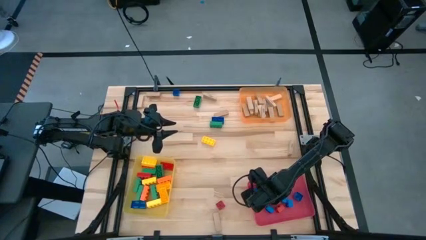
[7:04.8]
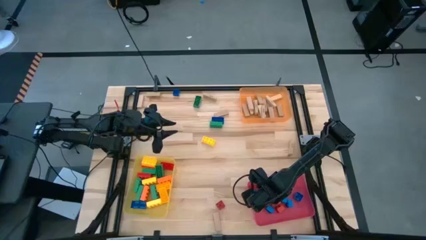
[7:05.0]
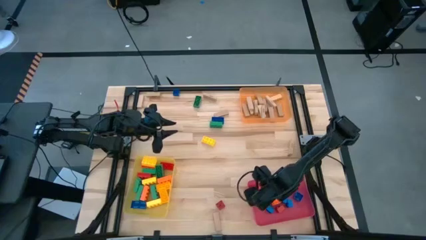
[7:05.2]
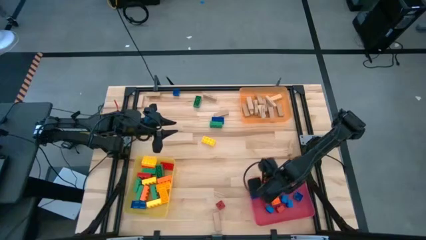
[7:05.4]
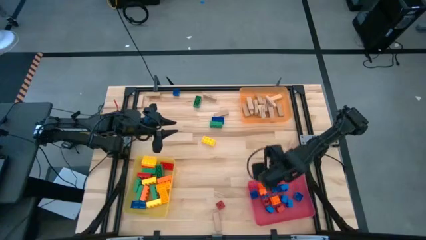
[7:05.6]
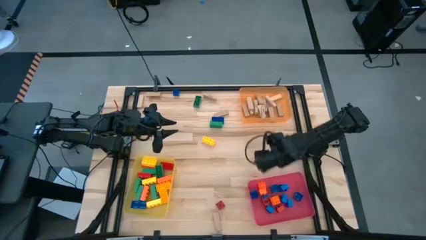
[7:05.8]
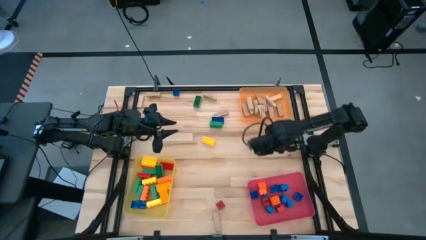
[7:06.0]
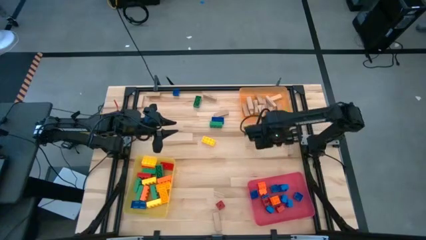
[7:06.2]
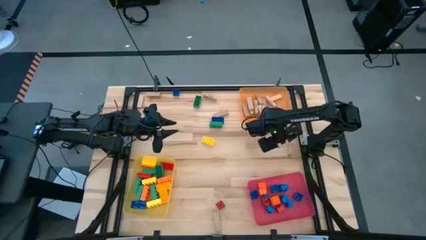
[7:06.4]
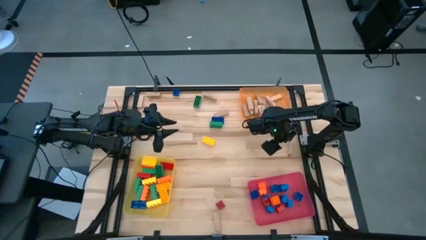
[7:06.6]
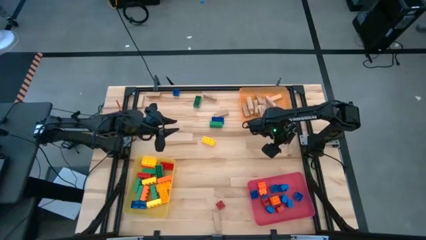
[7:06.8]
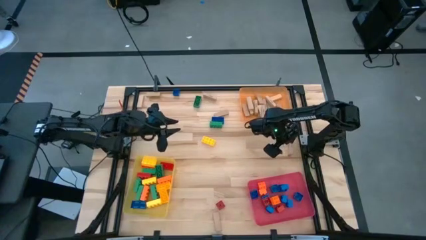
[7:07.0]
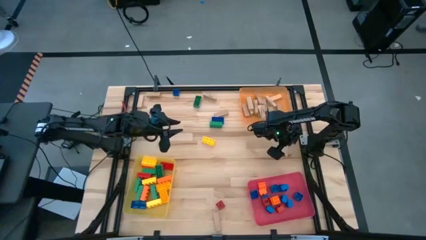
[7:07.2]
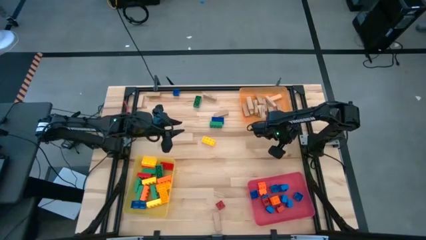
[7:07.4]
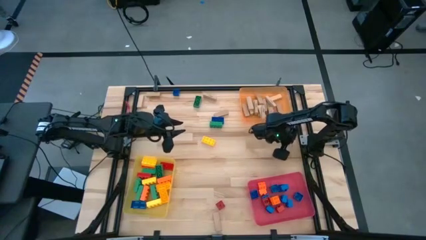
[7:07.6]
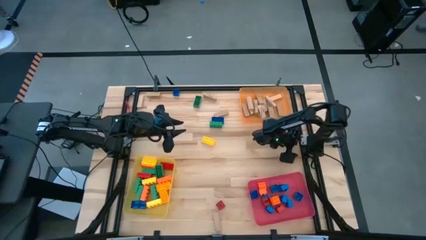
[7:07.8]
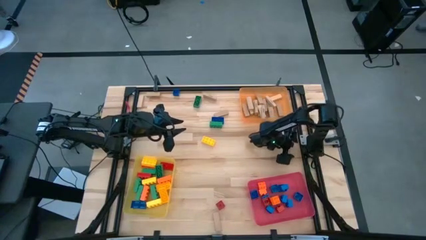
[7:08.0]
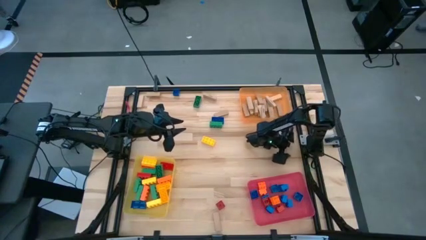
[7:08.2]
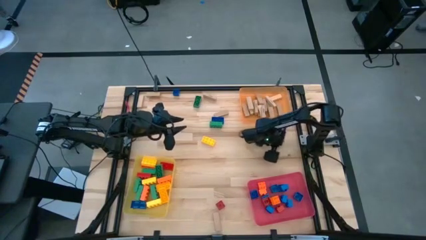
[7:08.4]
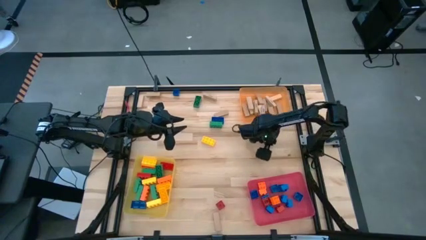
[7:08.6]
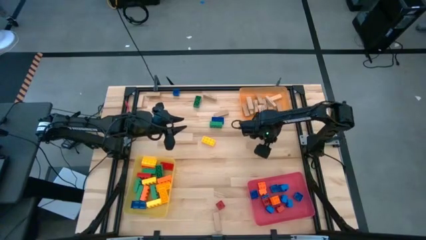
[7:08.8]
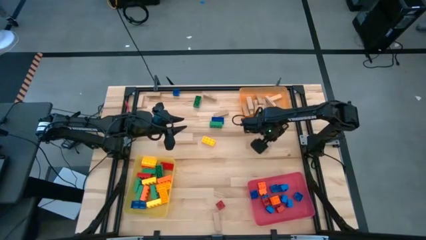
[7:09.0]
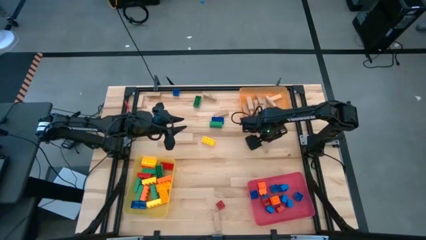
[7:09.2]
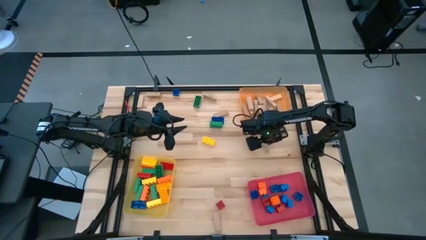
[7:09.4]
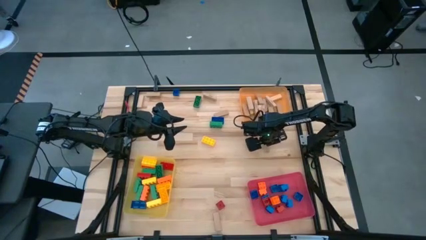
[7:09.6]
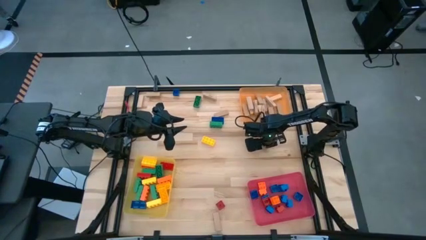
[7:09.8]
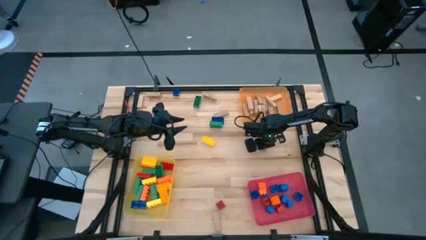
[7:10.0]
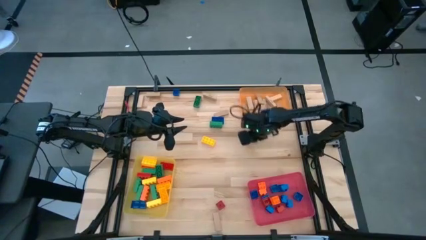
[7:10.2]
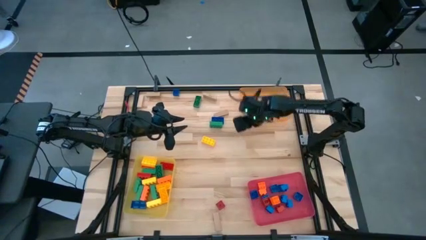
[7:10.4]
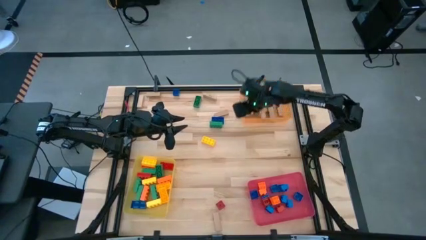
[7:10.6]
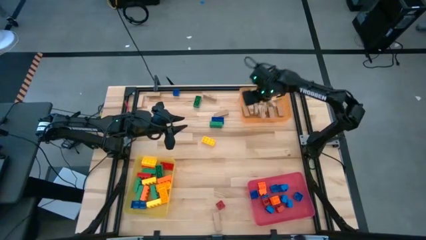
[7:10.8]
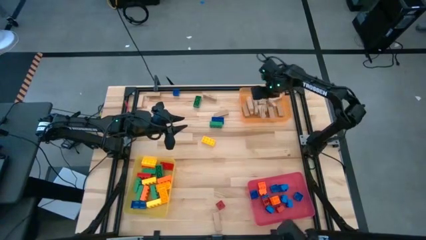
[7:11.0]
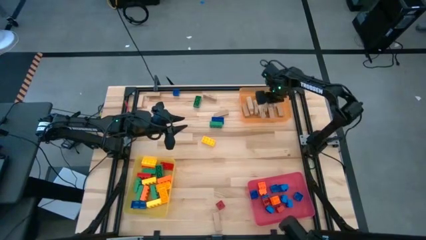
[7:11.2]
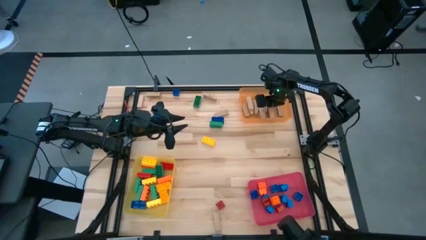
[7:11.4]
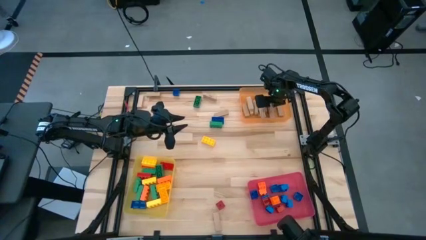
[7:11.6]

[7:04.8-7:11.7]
Task: Sort blocks by size
Put the brown block into the orange bin

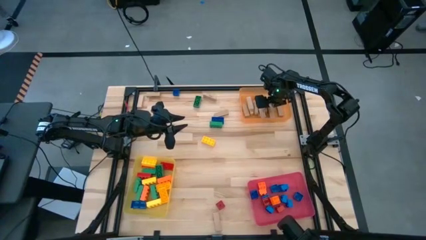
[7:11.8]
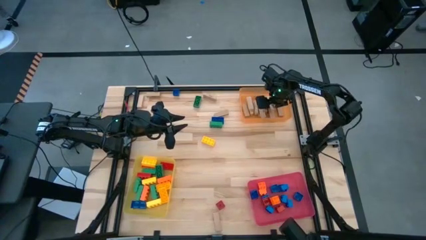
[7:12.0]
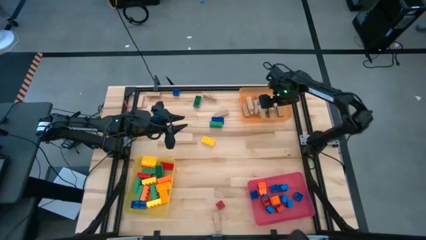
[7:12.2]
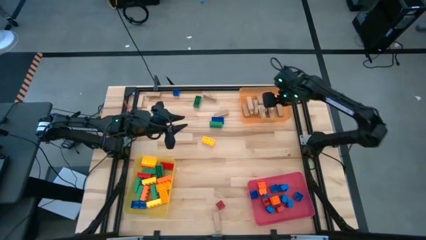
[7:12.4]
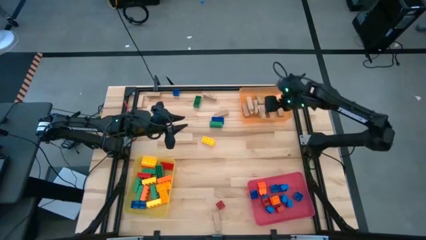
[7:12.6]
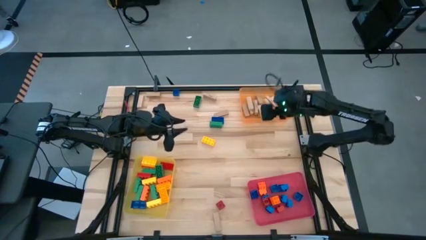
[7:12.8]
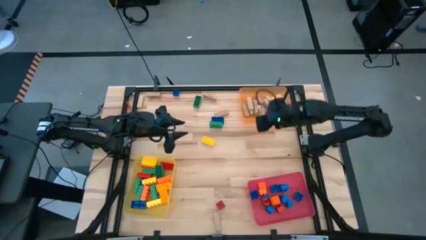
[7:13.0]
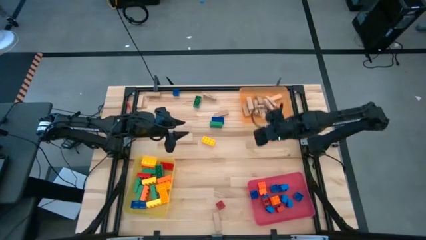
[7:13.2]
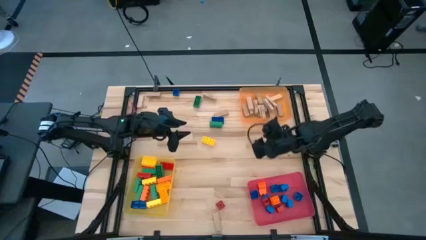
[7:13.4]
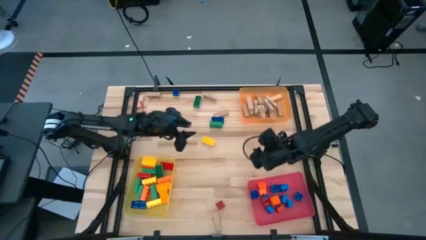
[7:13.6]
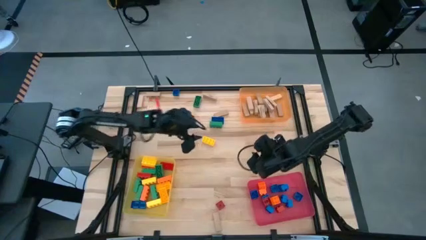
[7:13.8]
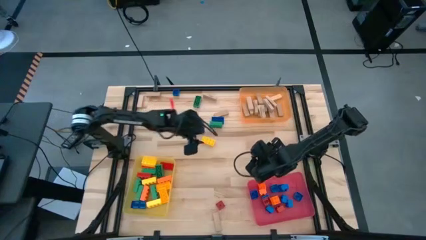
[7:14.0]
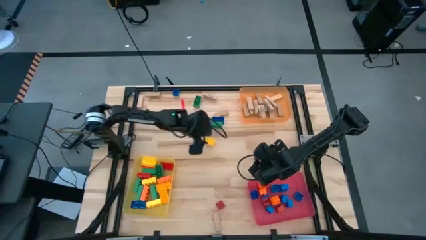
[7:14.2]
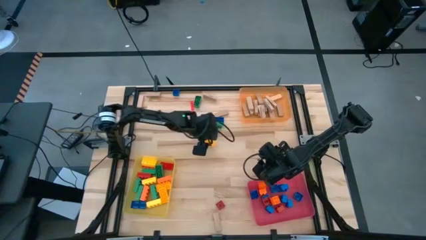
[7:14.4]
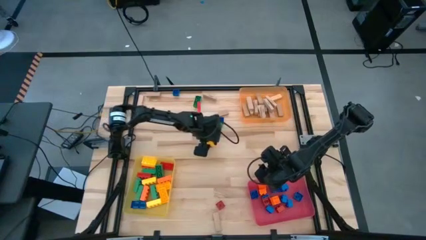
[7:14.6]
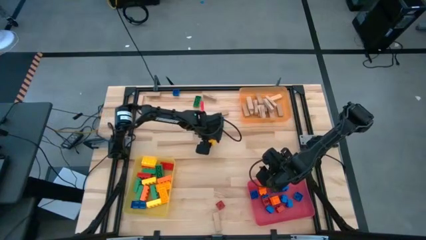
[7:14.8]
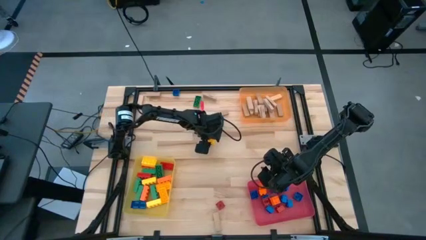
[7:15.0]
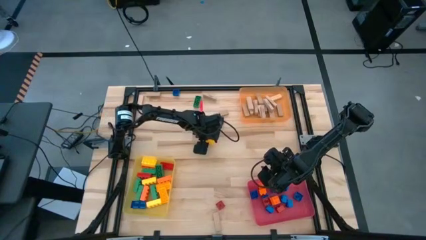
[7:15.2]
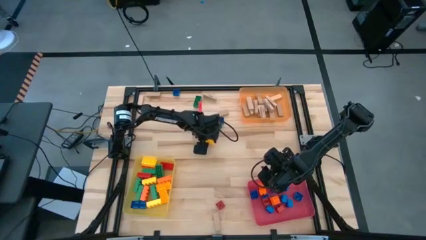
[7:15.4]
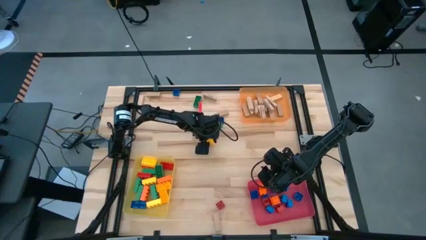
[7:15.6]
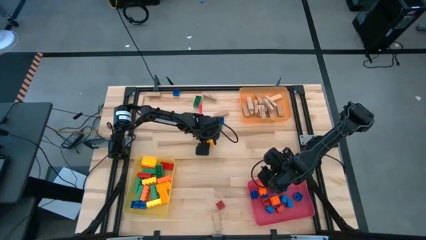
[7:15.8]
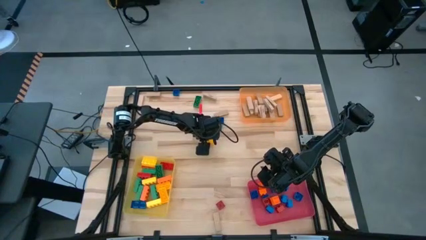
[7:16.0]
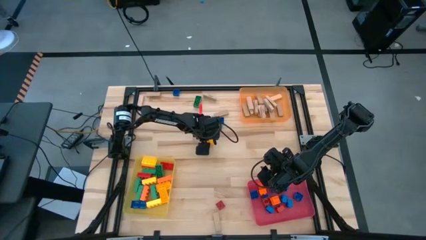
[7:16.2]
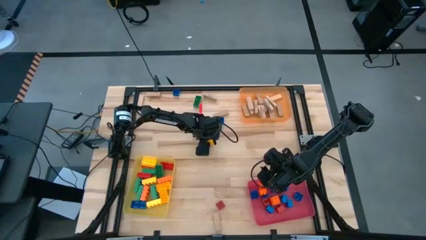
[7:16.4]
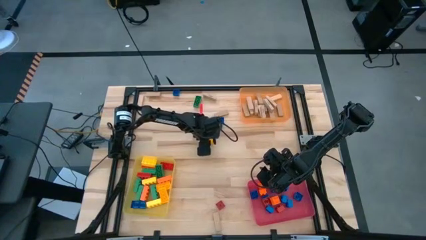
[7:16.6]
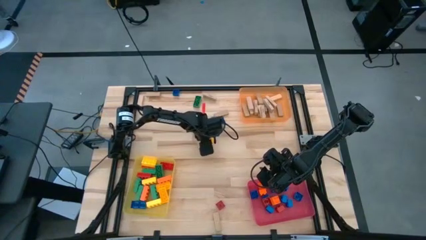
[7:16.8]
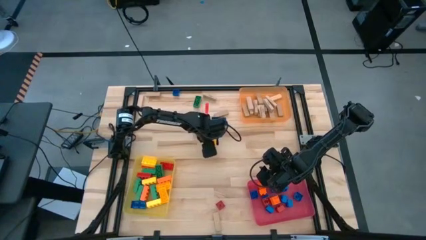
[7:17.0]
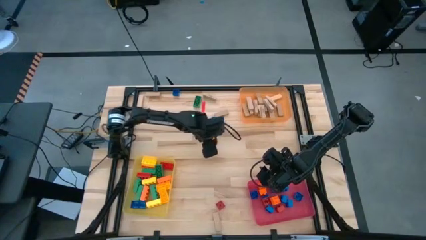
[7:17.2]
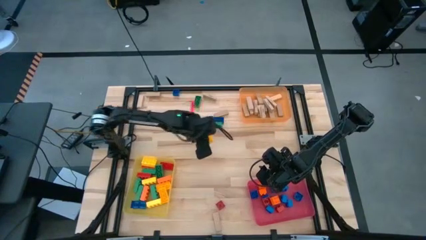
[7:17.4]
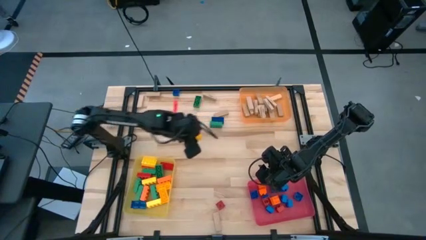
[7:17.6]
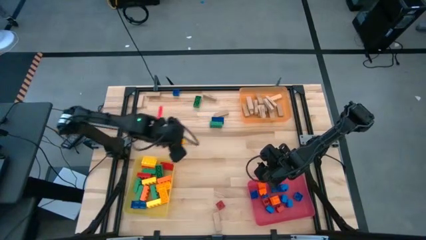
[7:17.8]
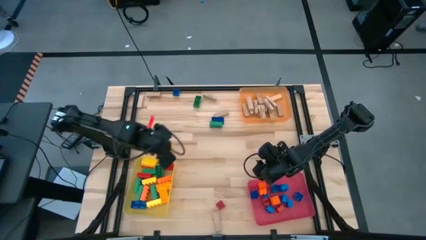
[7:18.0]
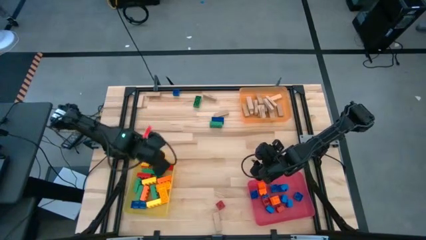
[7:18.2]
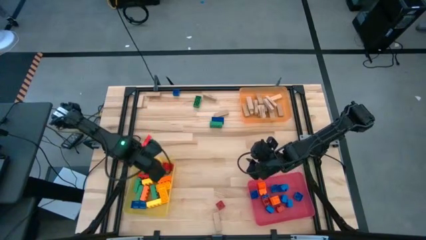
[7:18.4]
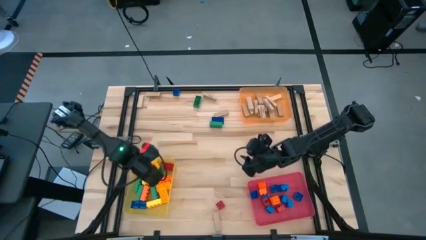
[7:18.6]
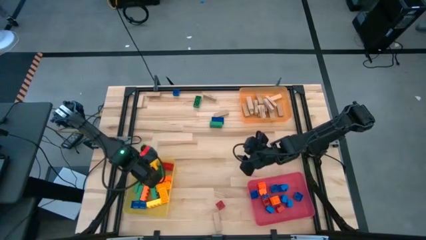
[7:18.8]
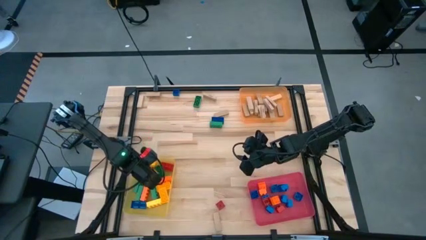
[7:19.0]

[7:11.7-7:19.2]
Put the large yellow game piece into the yellow bin

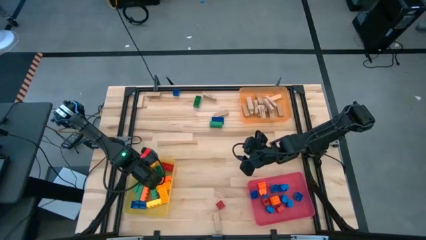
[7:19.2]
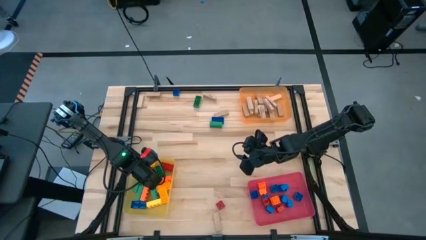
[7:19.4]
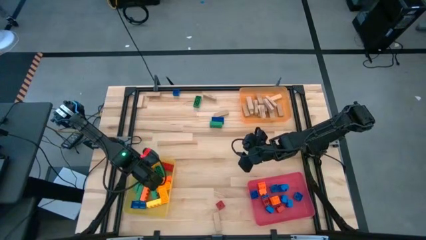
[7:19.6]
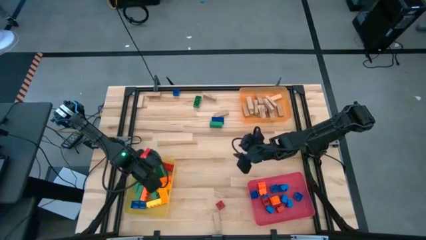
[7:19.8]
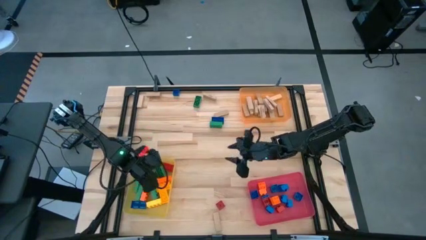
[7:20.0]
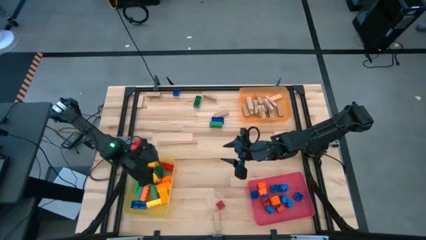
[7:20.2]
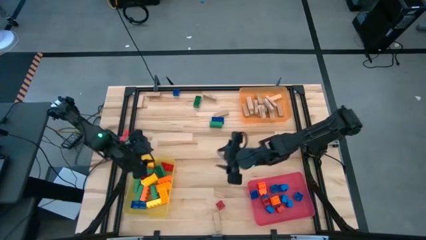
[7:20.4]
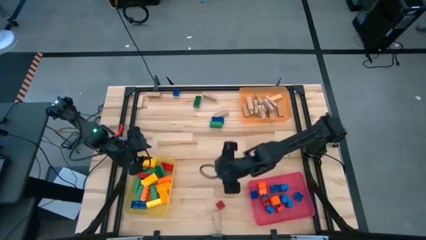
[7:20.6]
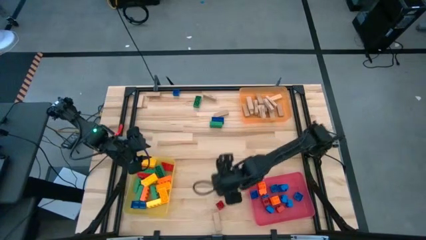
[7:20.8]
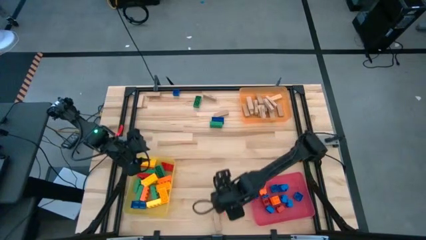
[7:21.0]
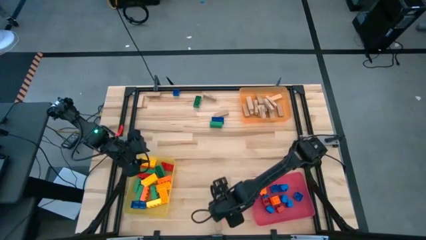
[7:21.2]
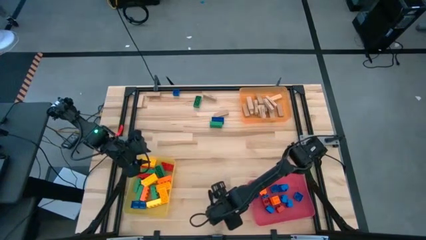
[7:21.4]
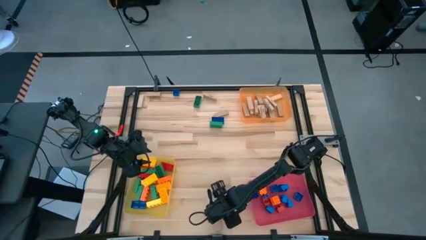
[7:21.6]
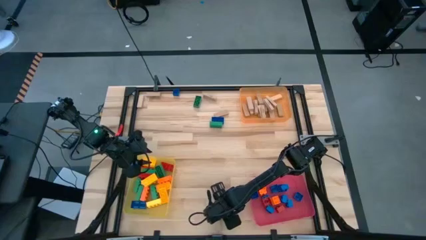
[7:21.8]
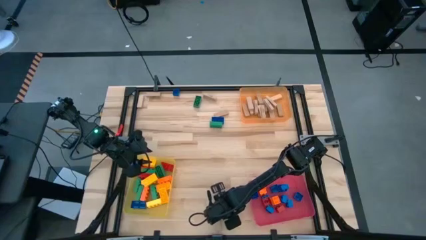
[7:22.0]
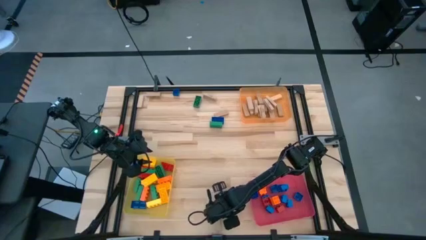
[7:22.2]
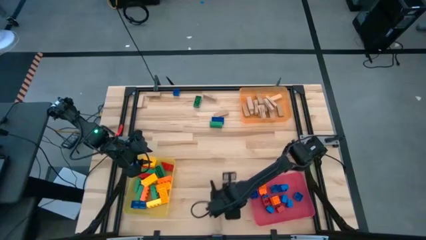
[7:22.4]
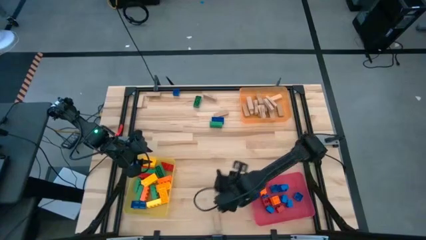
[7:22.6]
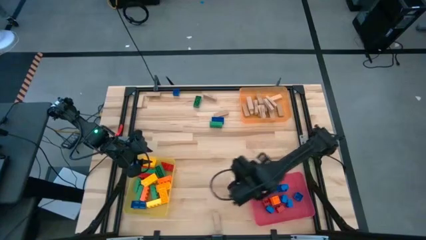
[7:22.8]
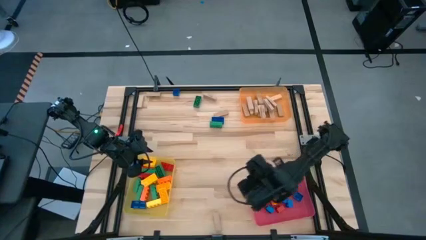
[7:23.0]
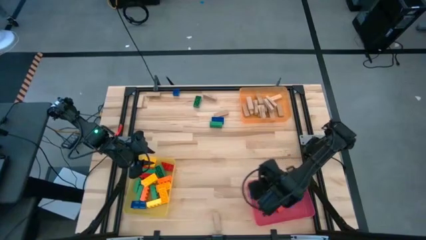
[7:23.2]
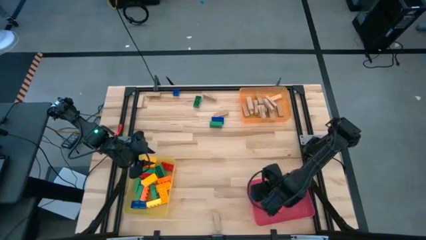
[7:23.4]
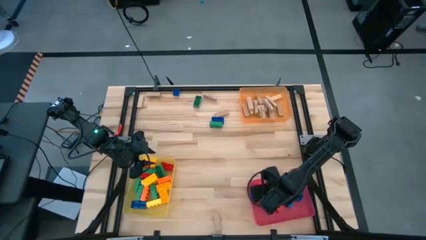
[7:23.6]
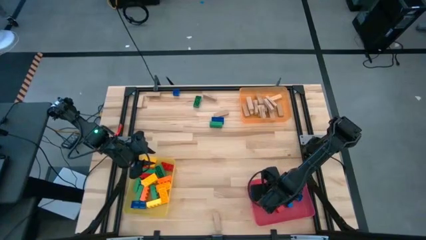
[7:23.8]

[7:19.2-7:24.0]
Put the small red game piece into the red bin
